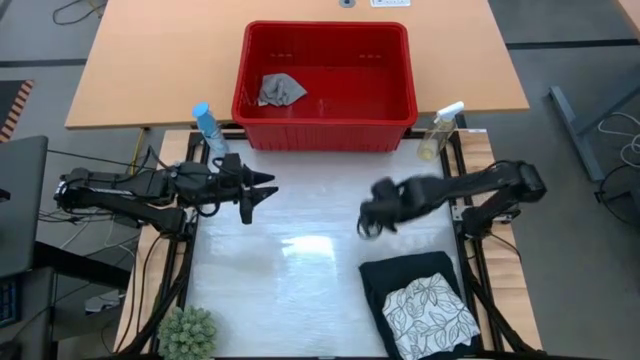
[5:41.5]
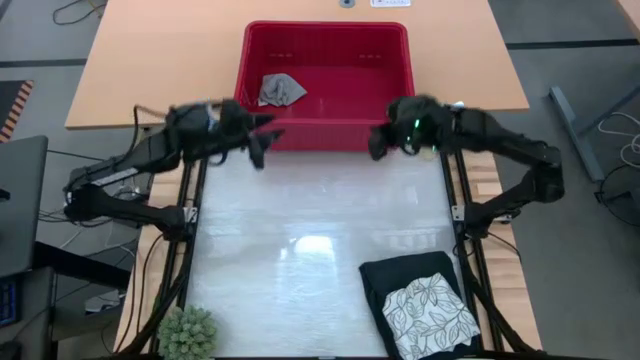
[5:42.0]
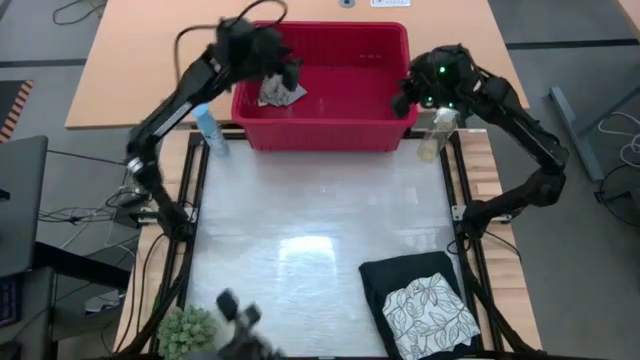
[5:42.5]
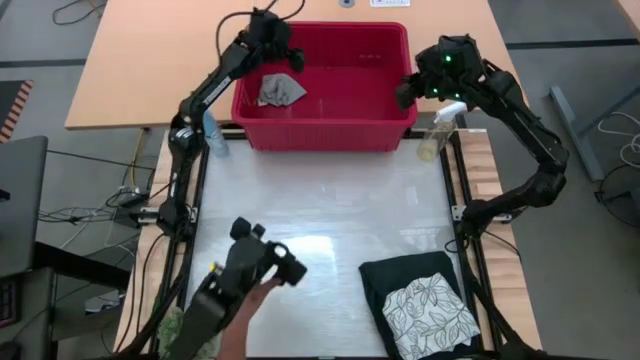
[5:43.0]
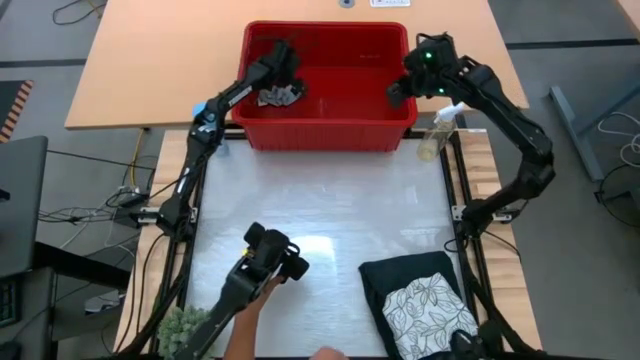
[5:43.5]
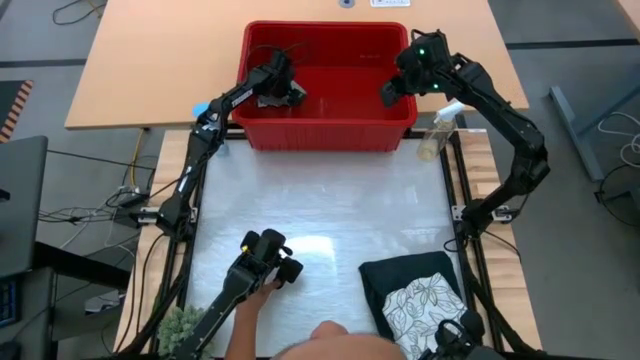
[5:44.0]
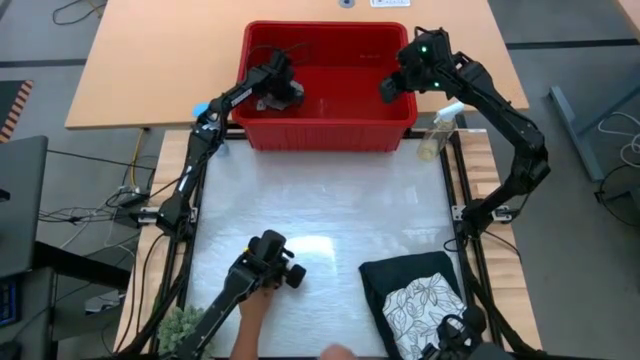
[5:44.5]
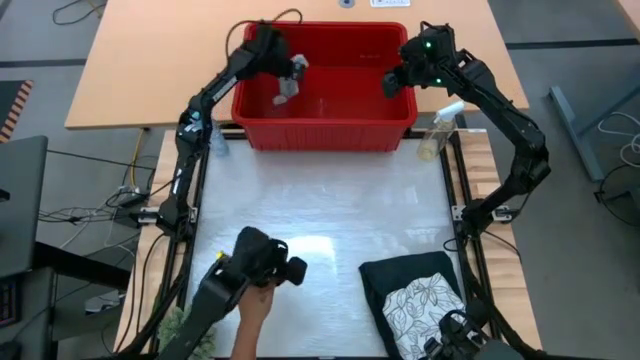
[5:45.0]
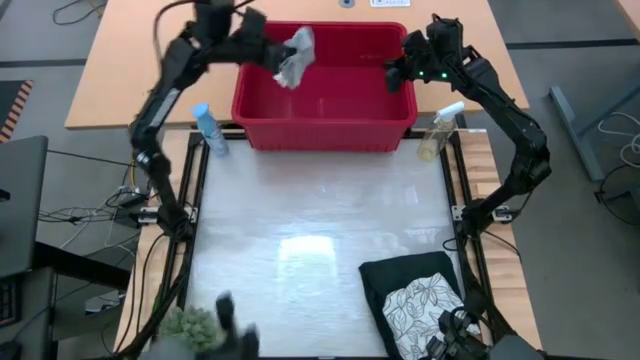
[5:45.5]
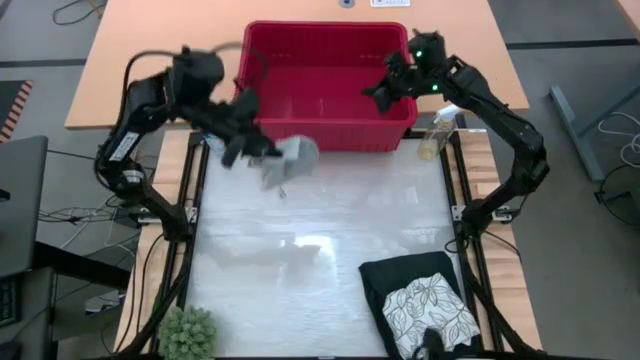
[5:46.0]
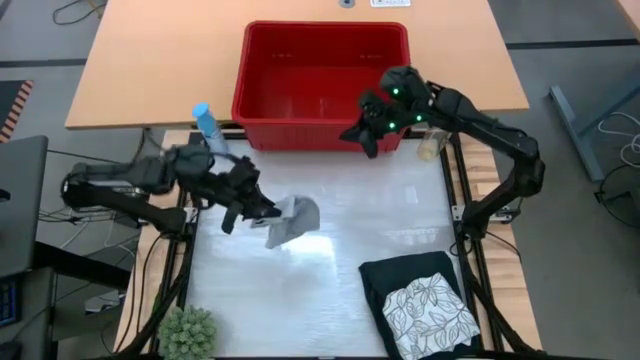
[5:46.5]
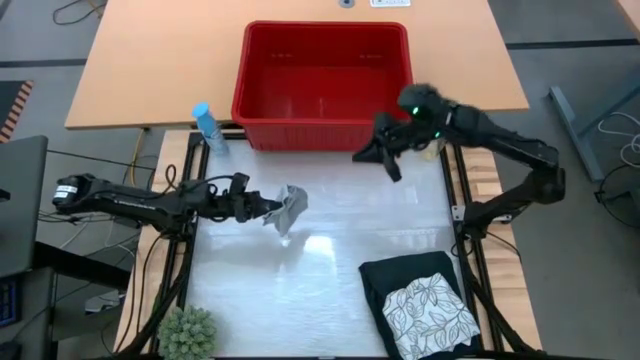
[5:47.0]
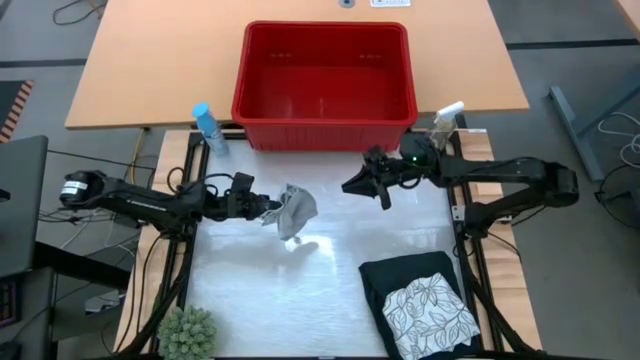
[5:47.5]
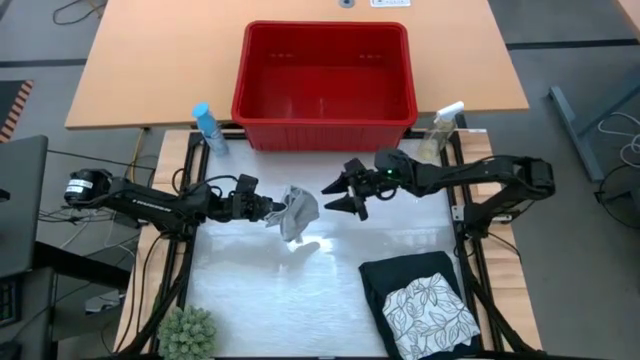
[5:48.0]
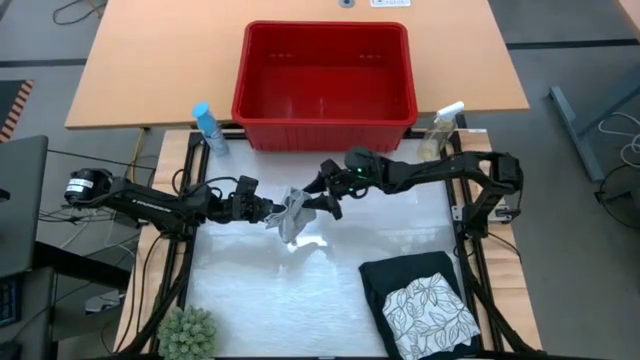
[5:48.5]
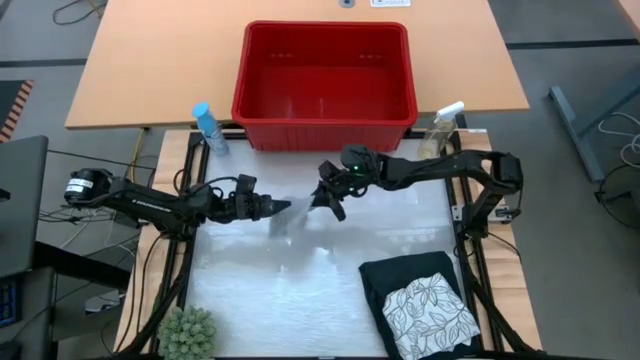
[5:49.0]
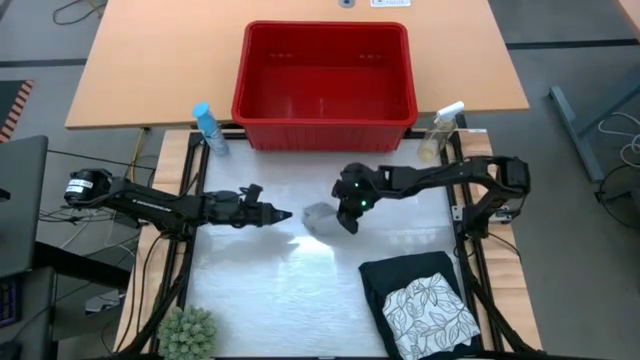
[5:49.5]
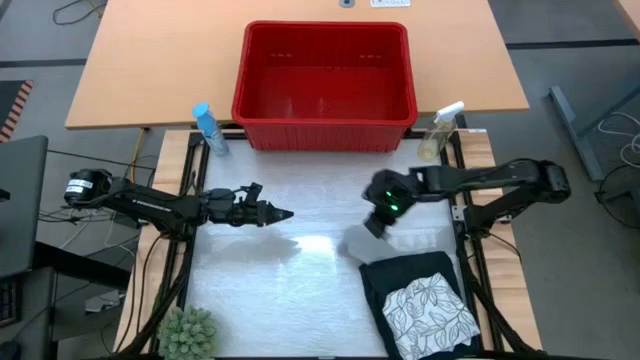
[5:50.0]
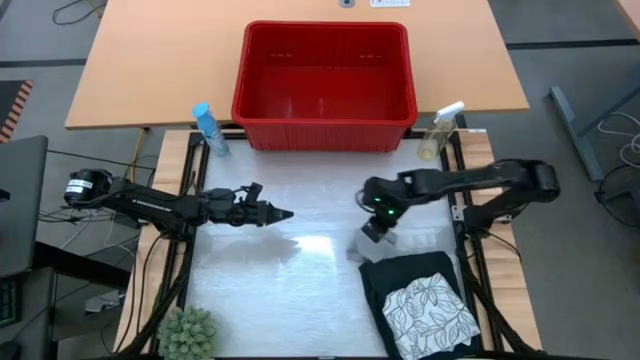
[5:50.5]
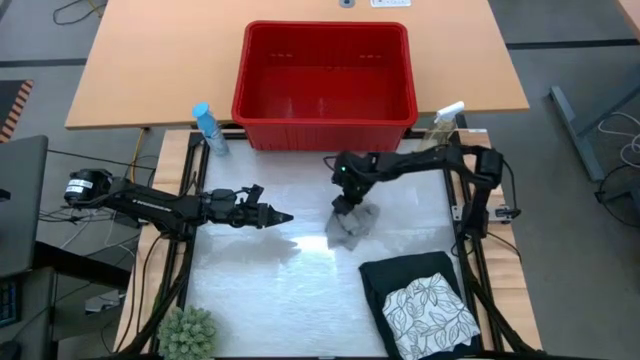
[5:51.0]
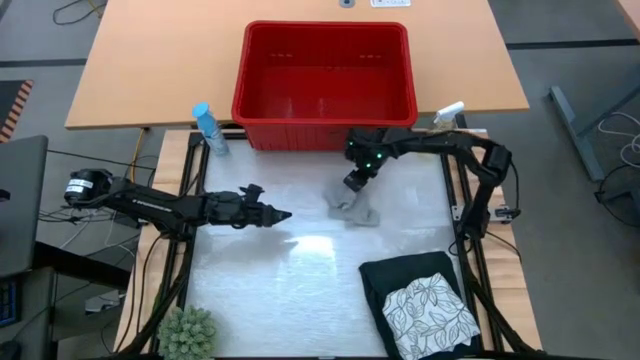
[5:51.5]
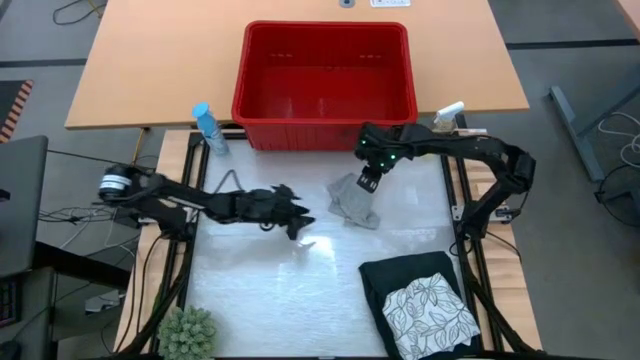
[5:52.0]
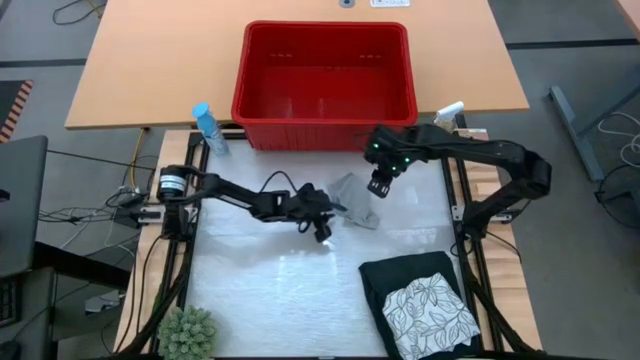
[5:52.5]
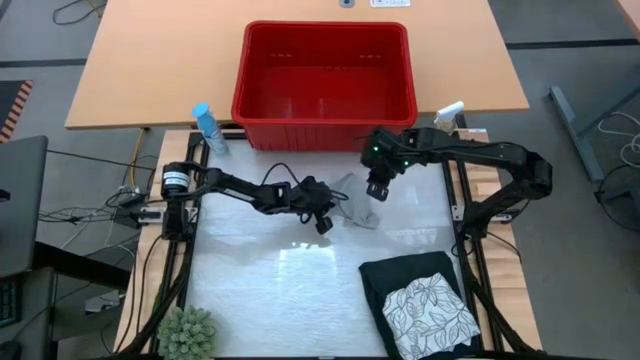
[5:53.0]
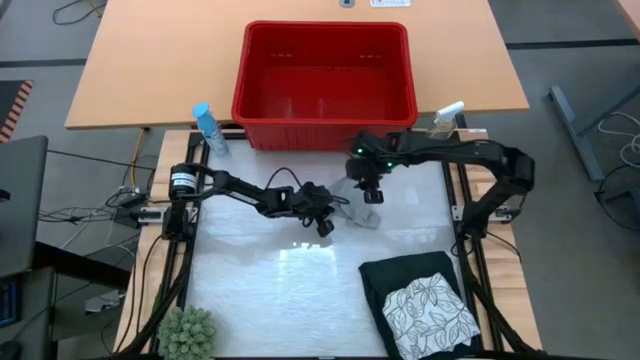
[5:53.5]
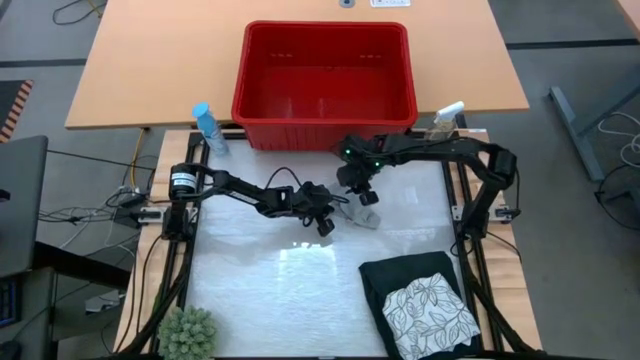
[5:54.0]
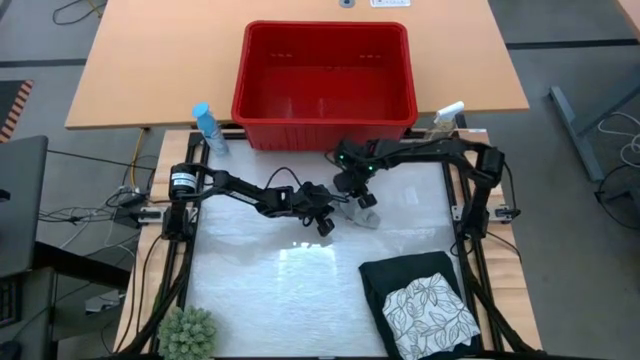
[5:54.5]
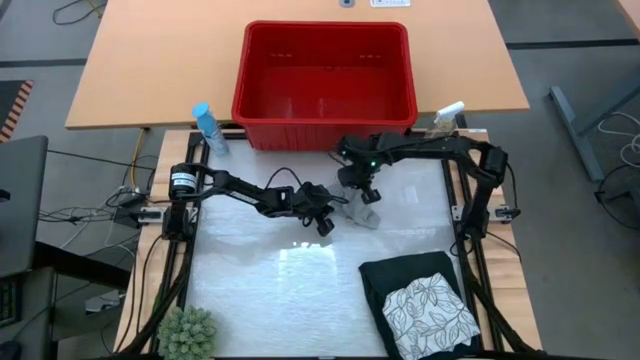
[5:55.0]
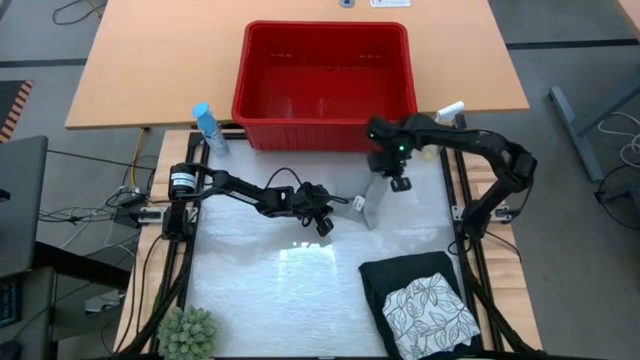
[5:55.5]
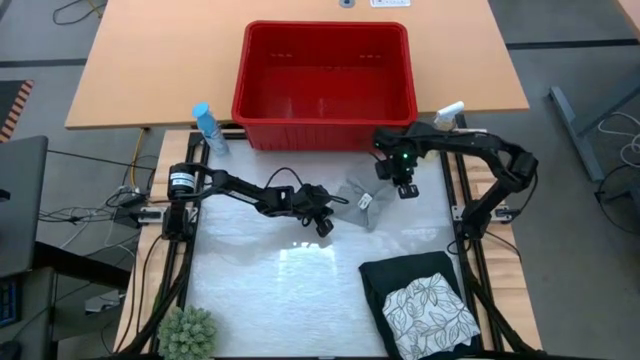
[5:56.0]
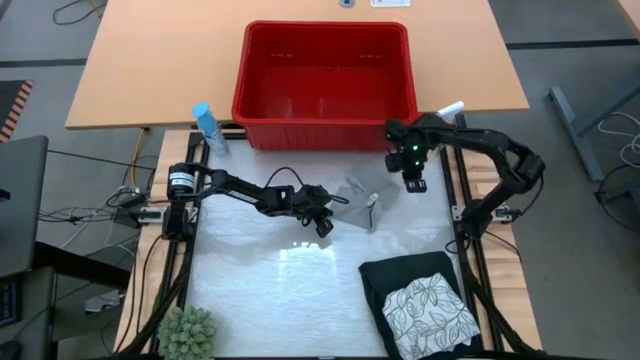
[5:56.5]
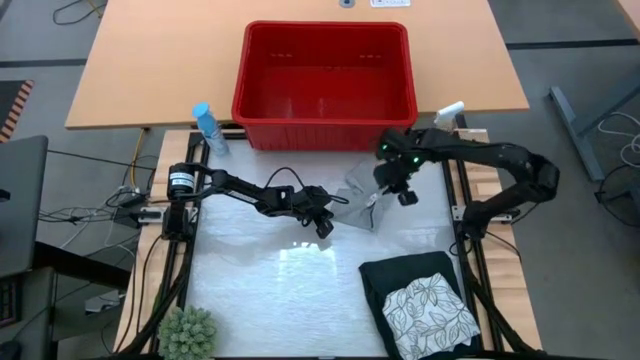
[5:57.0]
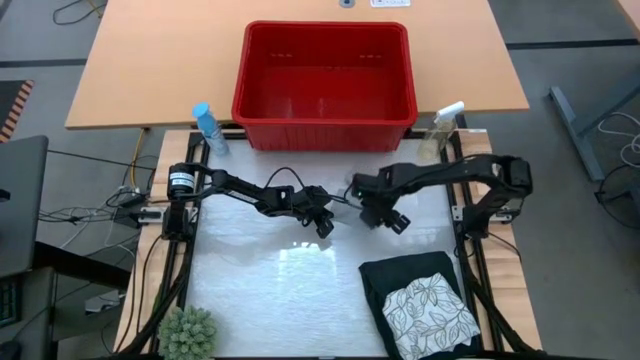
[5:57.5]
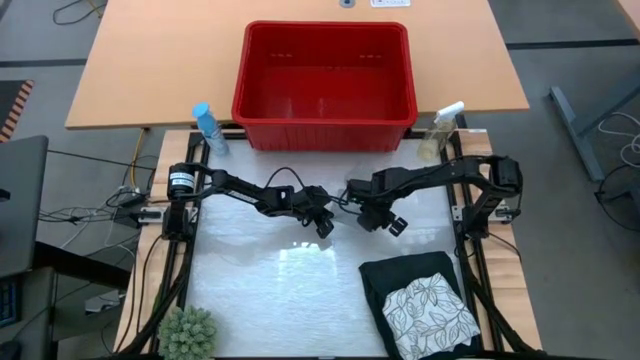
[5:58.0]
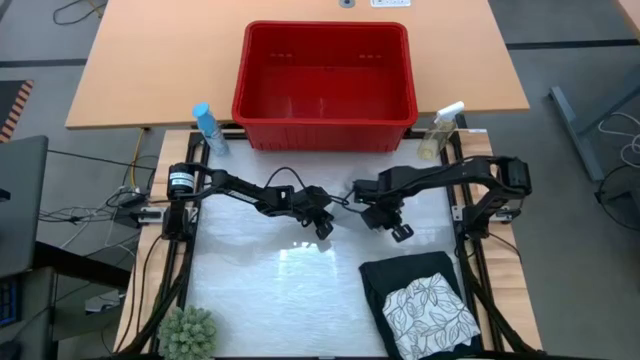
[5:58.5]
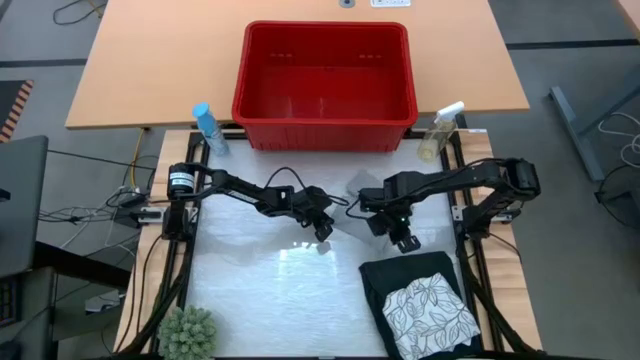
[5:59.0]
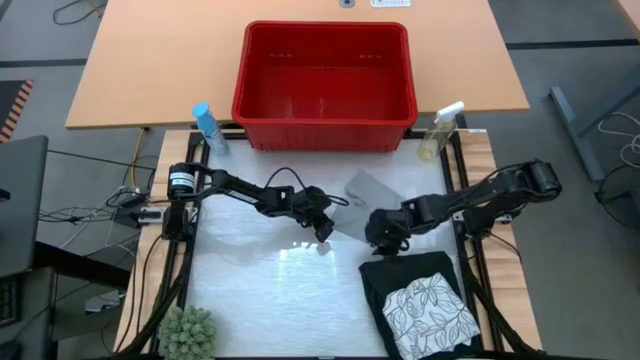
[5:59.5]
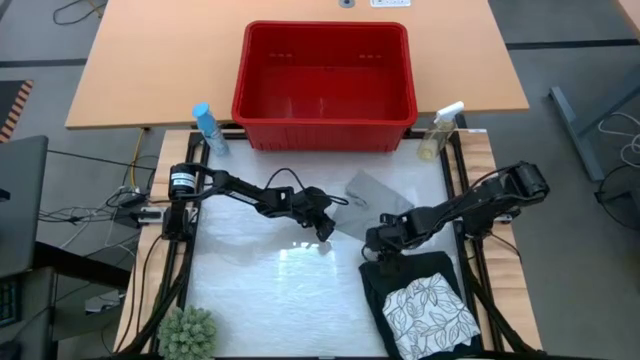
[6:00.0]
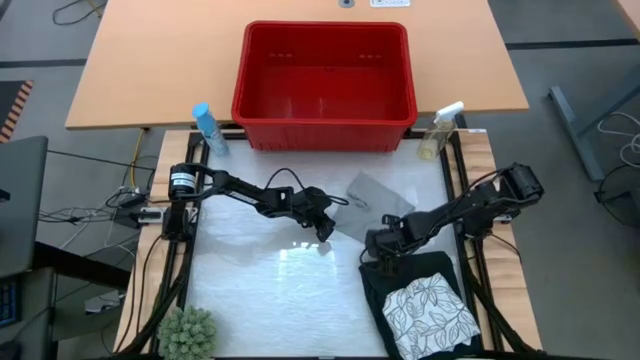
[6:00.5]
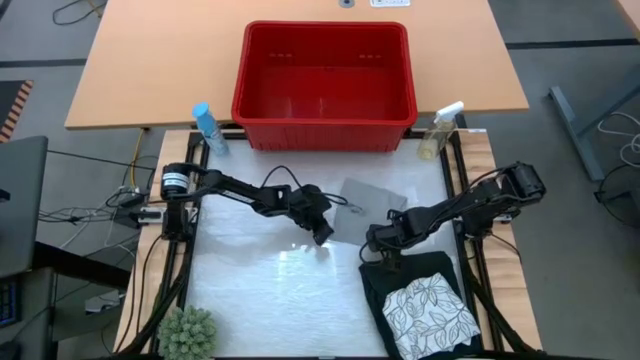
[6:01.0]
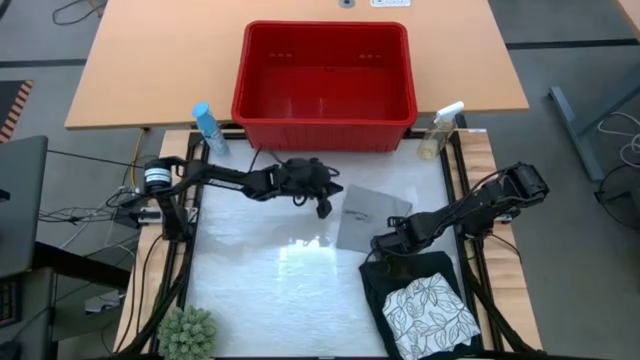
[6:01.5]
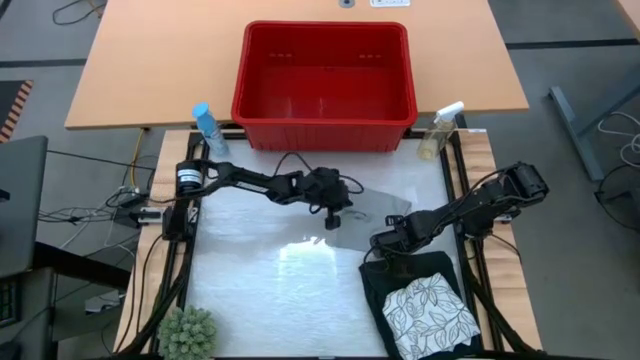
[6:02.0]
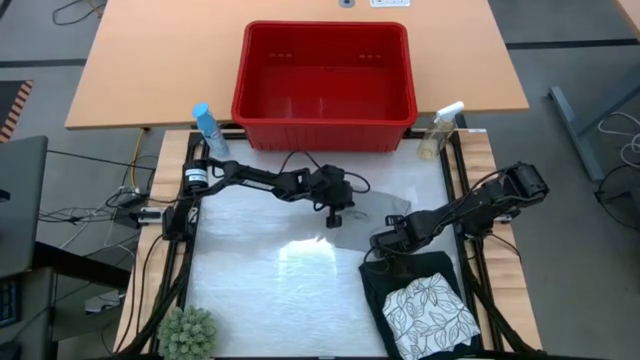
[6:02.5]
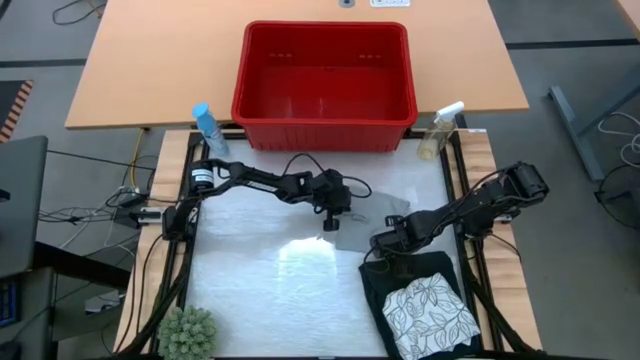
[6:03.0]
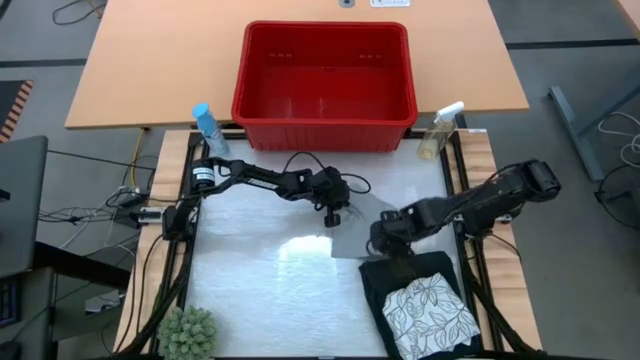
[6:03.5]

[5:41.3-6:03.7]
Task: Fold laundry
Fold the gray boxer shorts
